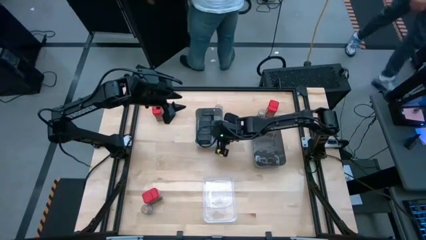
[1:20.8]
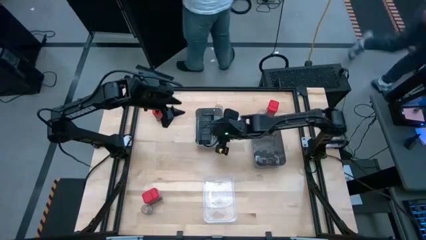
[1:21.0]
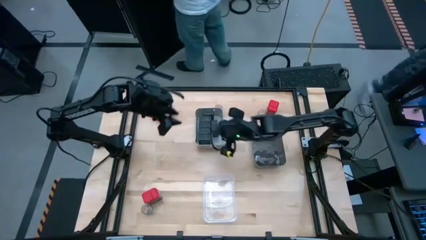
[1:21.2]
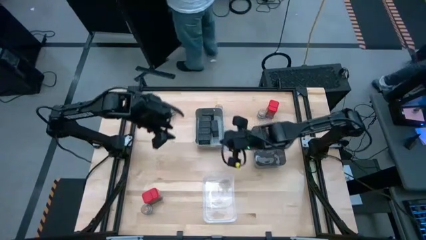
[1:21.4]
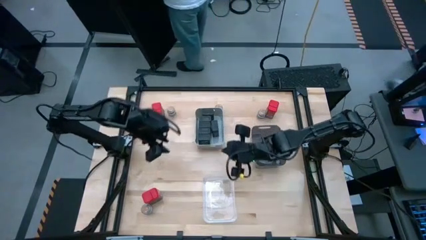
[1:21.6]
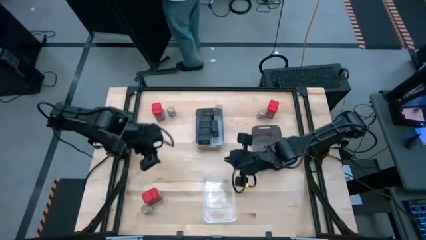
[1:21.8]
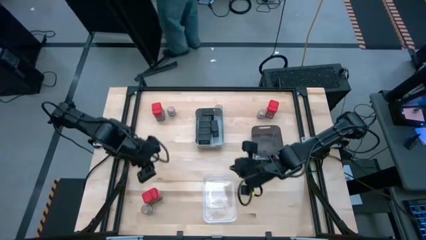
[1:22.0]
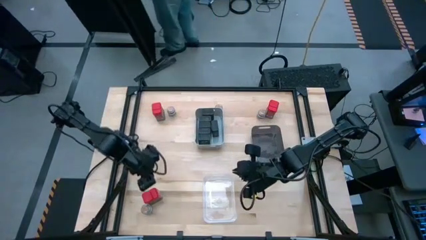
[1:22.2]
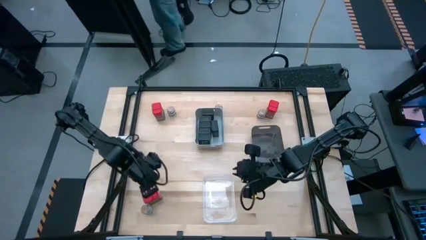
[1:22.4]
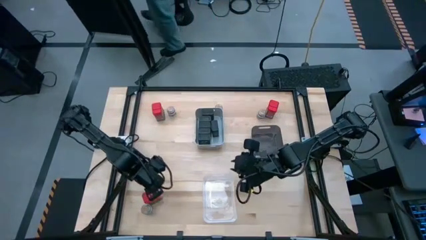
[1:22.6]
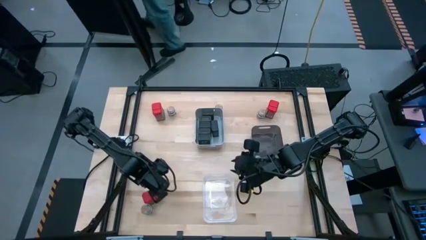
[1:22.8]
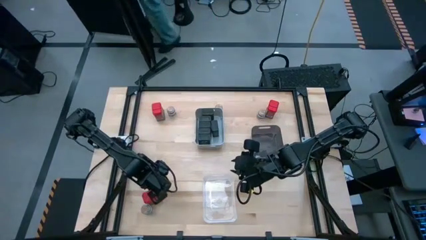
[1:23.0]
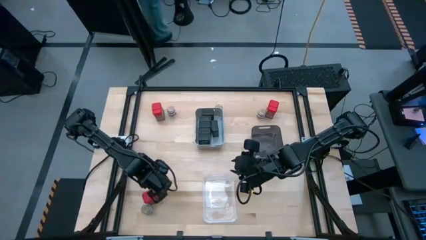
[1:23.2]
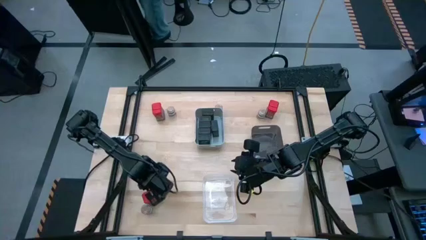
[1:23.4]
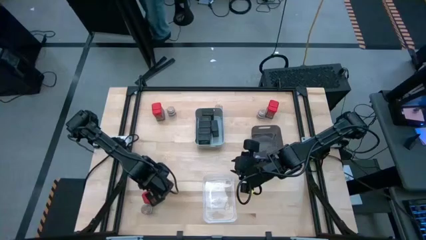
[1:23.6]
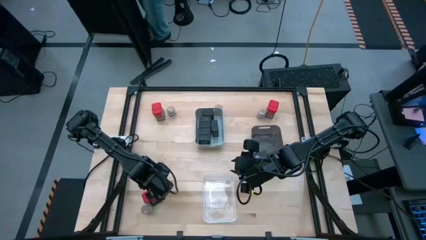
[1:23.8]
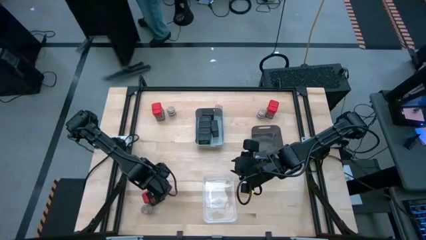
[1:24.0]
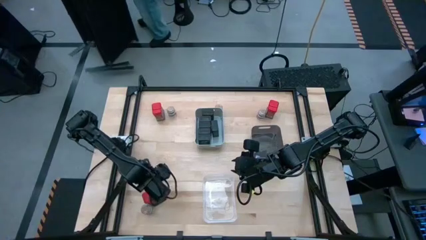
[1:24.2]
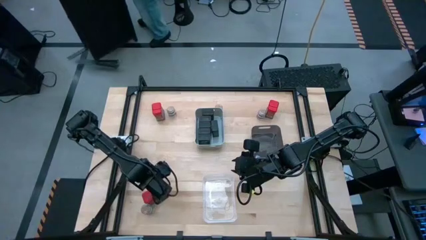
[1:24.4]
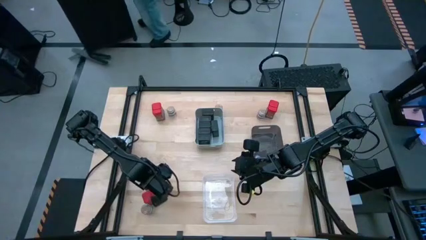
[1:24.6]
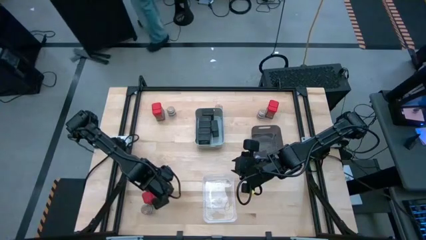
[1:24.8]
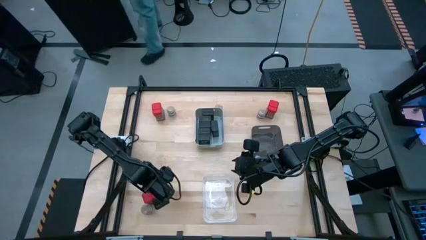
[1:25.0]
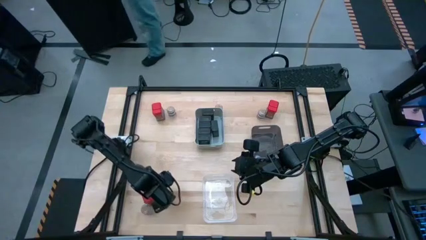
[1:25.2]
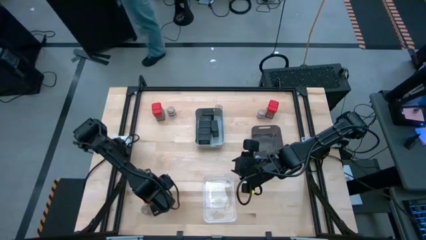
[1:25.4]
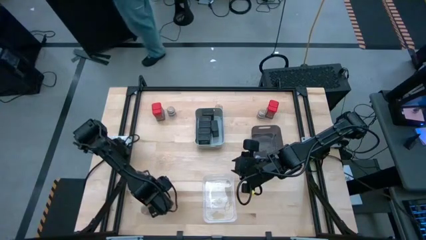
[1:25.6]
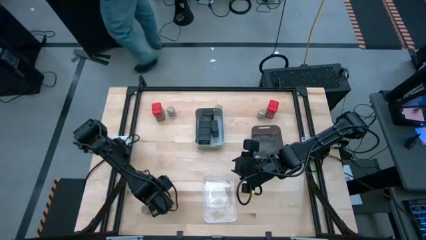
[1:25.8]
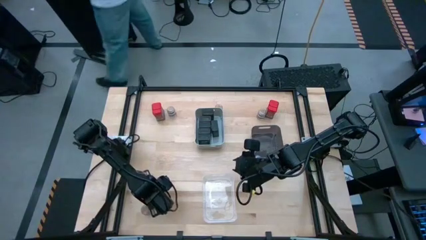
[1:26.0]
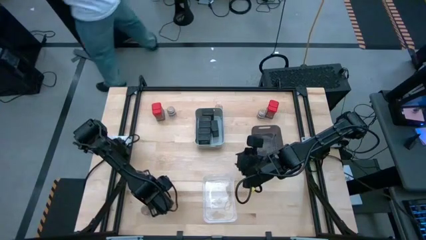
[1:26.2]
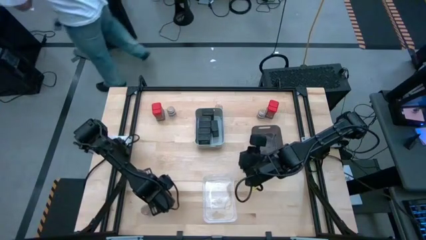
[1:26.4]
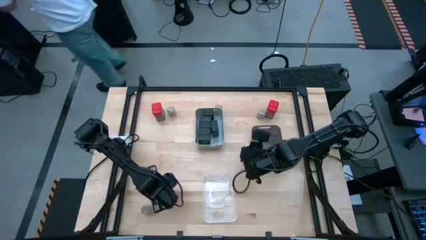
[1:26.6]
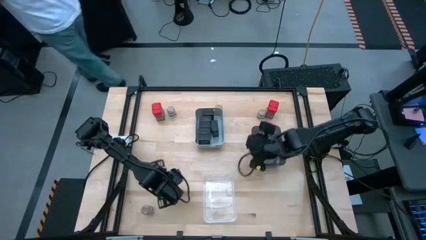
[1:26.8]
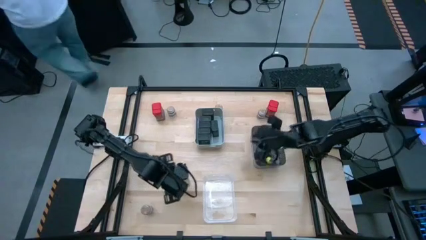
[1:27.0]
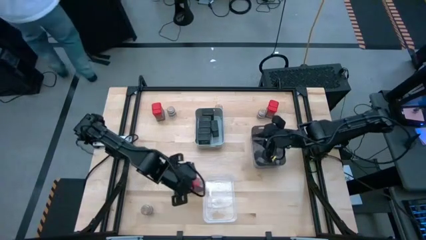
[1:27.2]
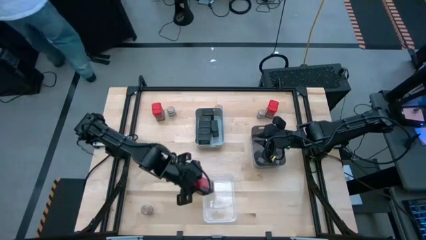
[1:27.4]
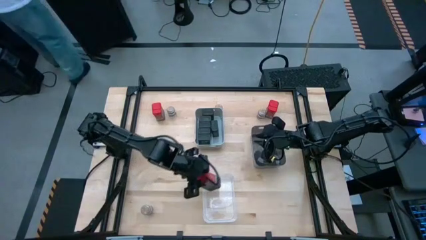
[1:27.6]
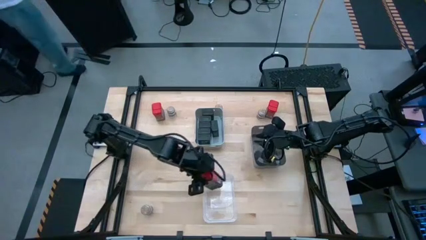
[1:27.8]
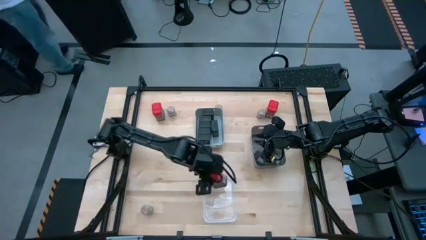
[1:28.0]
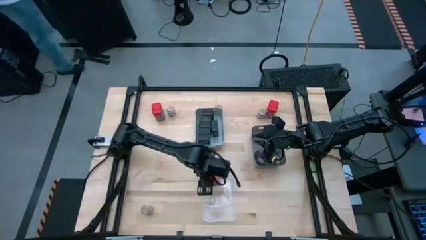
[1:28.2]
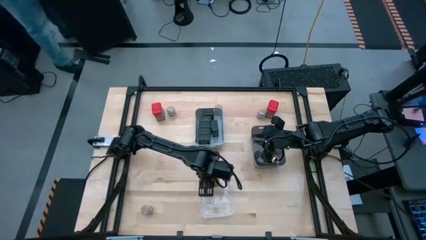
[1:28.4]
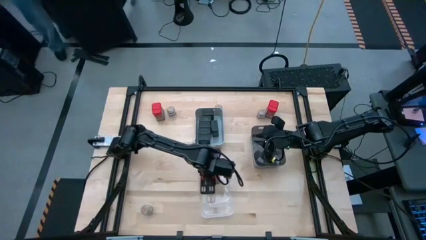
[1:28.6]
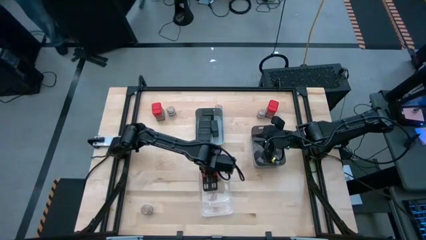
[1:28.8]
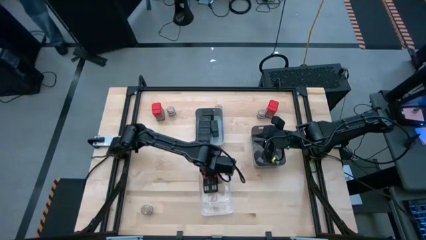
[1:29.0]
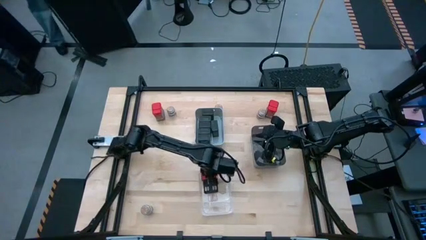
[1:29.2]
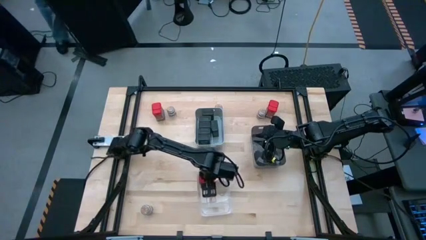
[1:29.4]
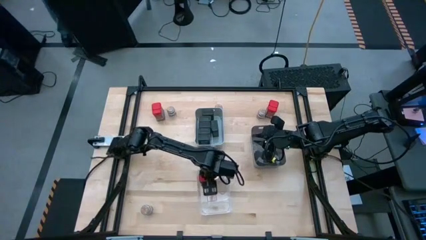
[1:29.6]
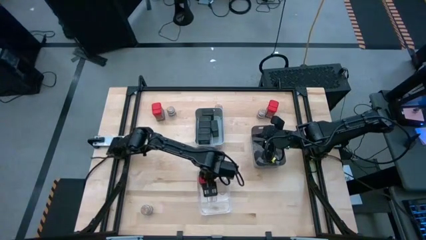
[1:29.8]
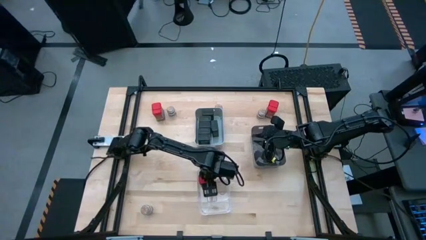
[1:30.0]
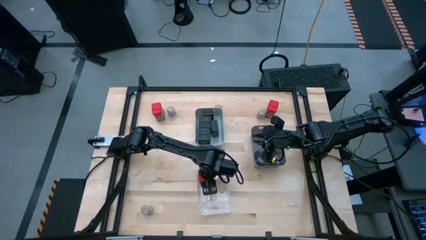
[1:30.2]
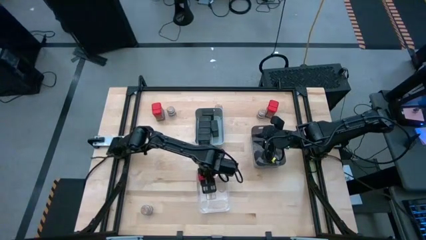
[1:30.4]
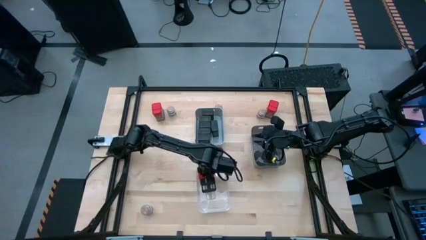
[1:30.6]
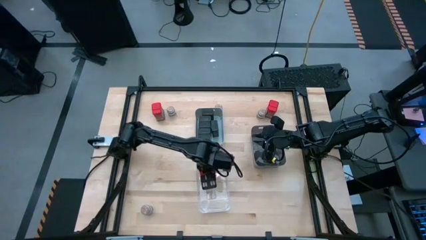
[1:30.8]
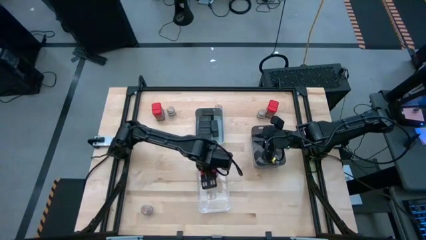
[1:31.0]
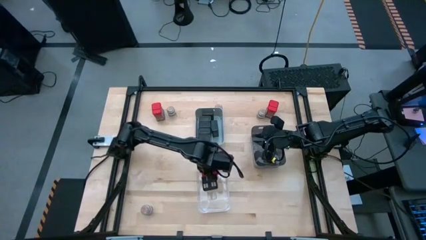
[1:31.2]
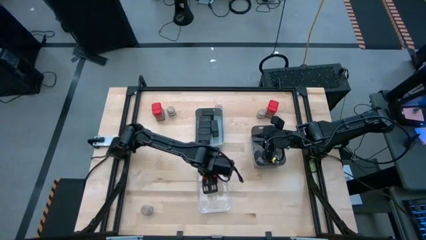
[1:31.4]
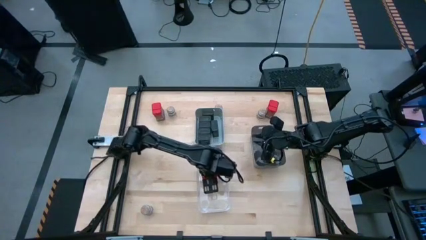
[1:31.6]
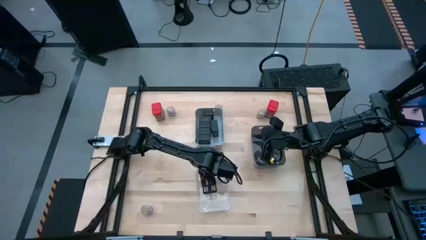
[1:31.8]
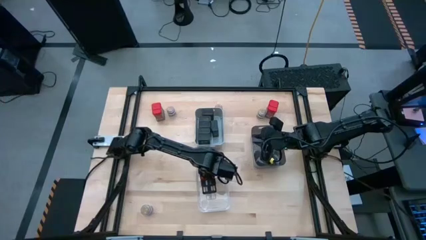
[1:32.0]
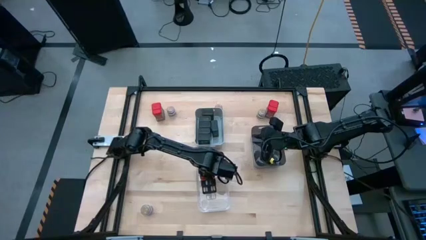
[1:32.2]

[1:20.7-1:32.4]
Task: Sort spices by type
Put the red spice can into the transparent bin

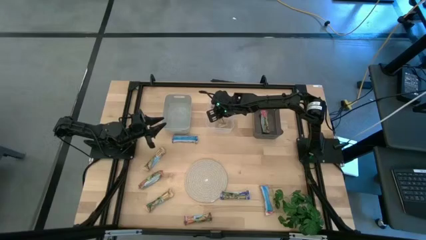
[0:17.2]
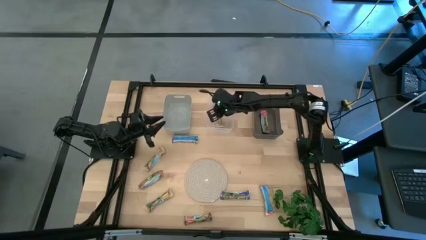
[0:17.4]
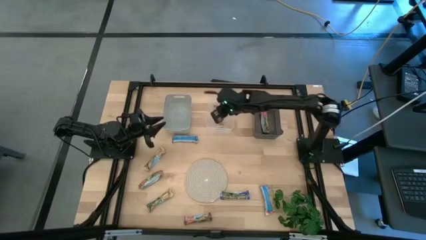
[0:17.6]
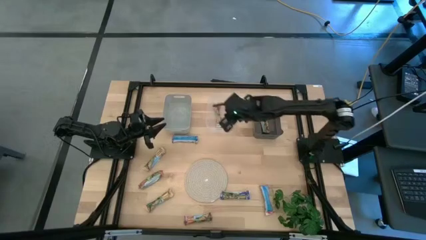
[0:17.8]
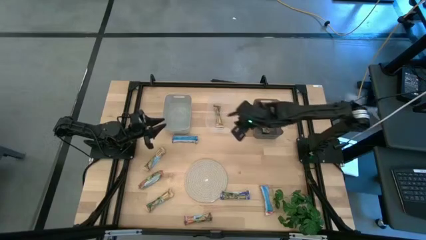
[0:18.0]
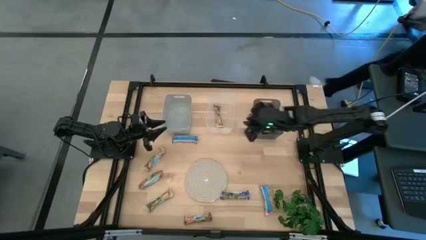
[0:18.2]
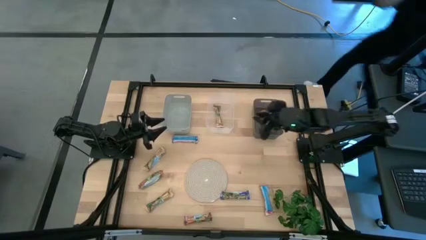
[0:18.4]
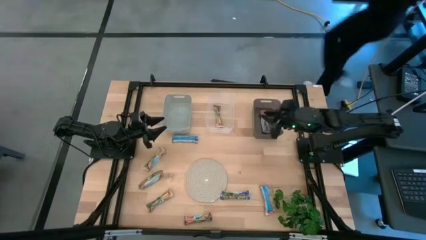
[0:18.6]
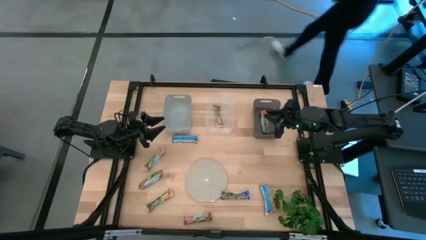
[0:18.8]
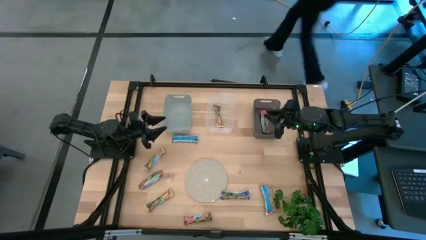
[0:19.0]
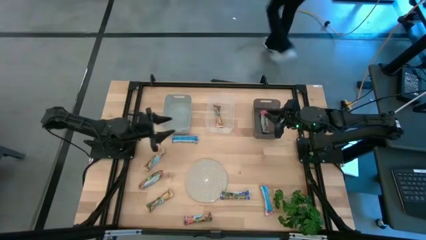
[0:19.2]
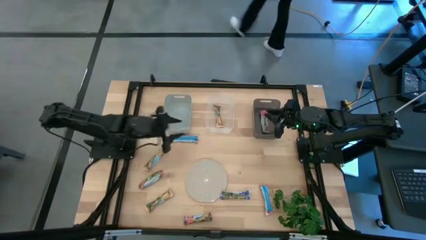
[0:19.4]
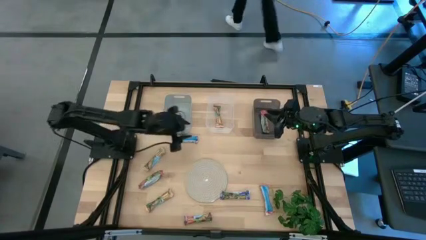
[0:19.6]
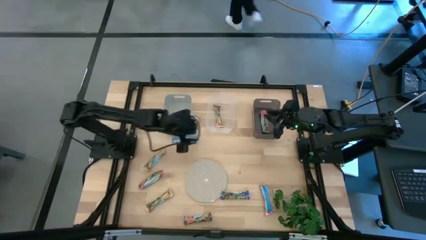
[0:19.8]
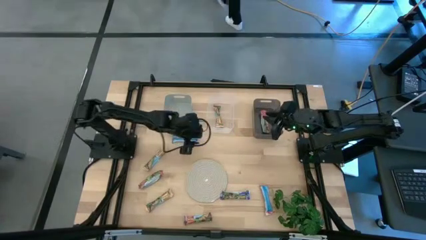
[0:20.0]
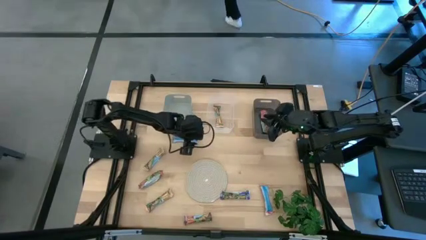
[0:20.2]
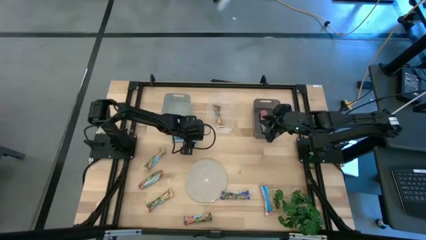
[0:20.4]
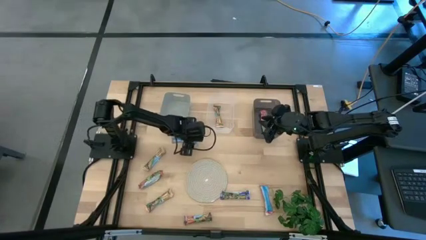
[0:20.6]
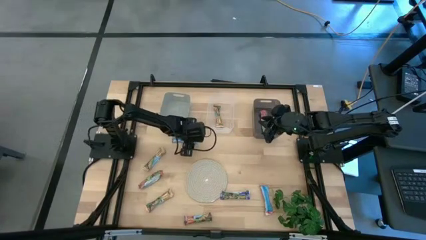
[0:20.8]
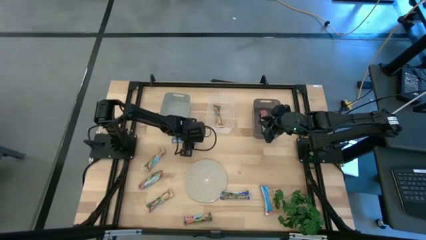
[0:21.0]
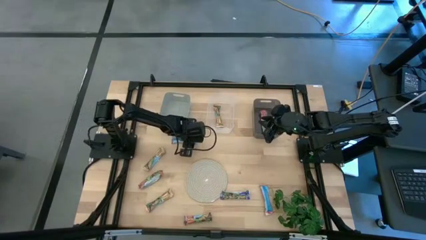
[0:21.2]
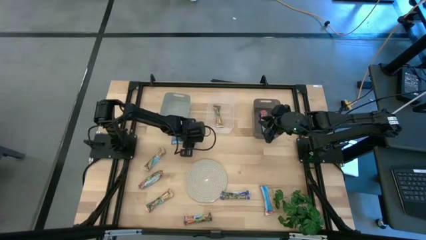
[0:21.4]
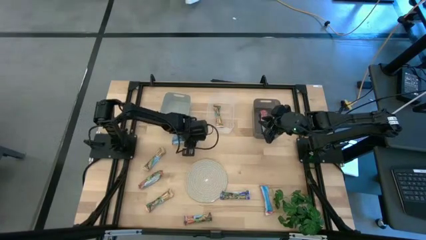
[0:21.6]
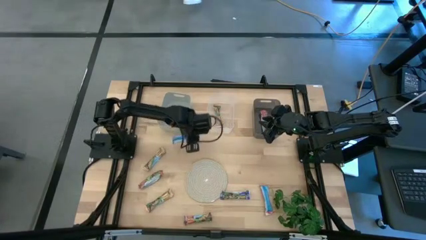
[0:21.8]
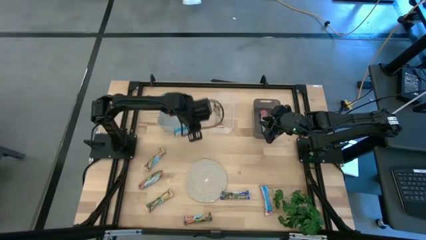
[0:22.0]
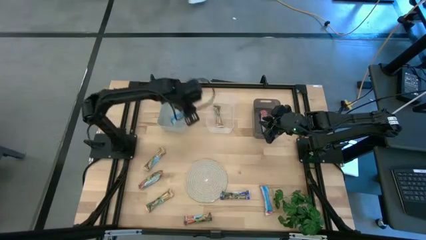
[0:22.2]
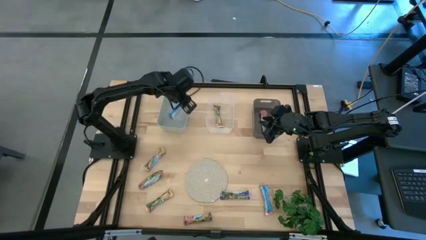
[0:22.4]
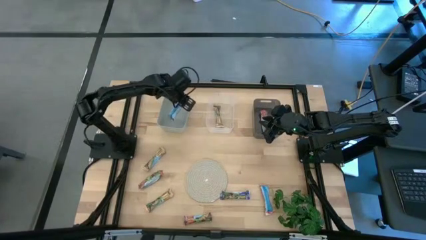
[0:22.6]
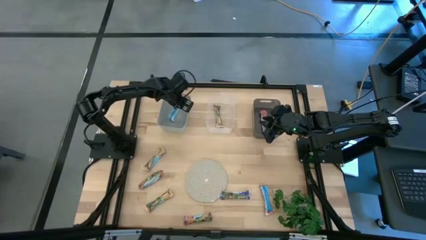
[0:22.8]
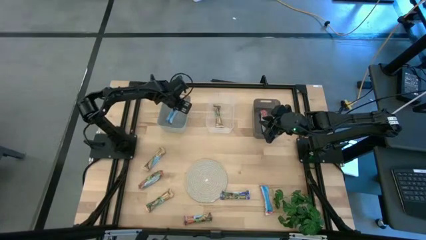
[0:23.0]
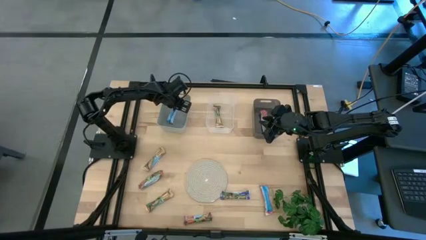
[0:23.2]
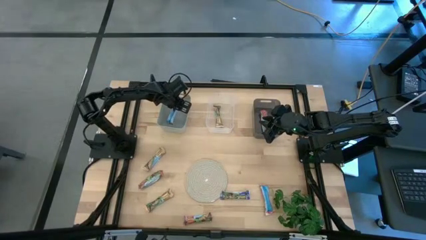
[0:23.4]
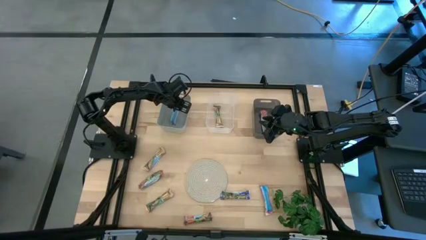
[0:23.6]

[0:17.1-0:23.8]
Task: Pick and place Granola Bars by type
Put the blue granola bar into the gray bin
